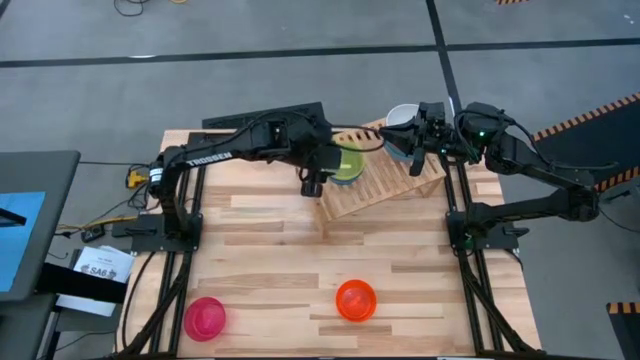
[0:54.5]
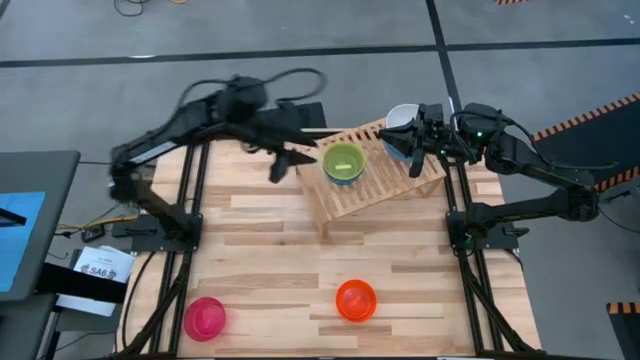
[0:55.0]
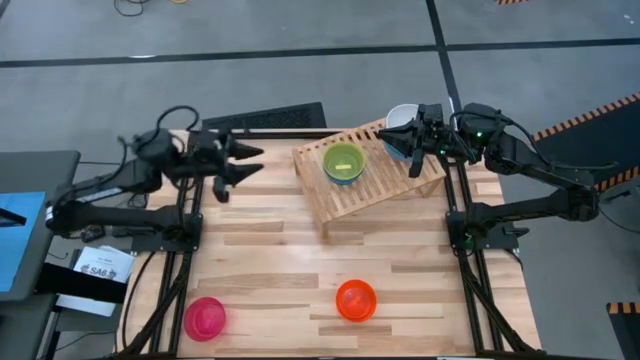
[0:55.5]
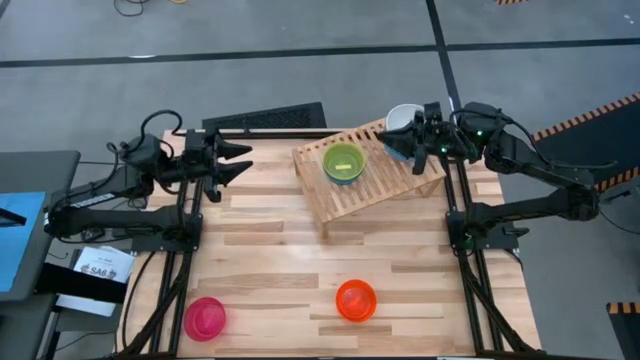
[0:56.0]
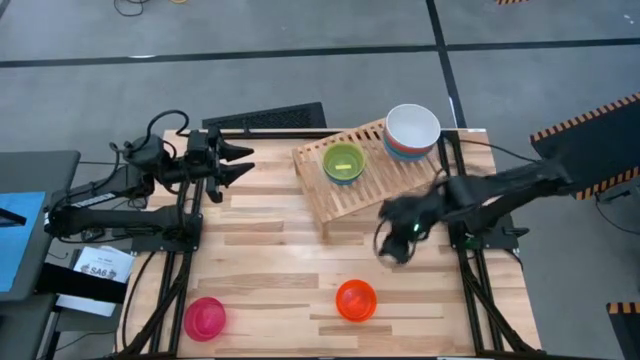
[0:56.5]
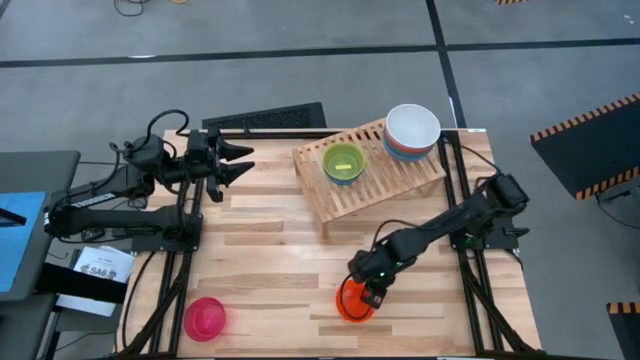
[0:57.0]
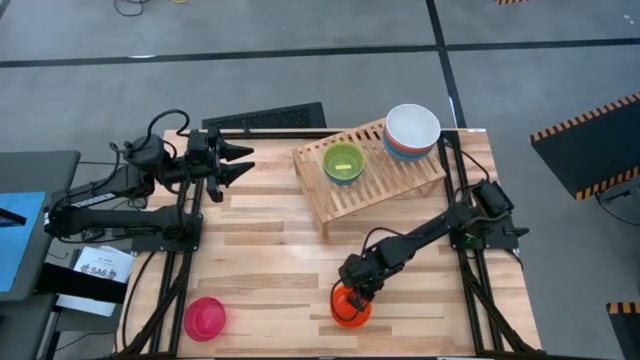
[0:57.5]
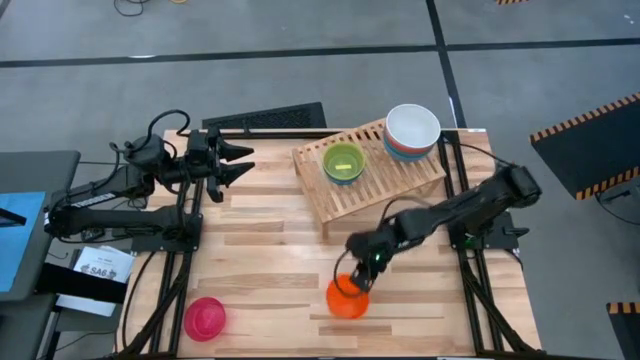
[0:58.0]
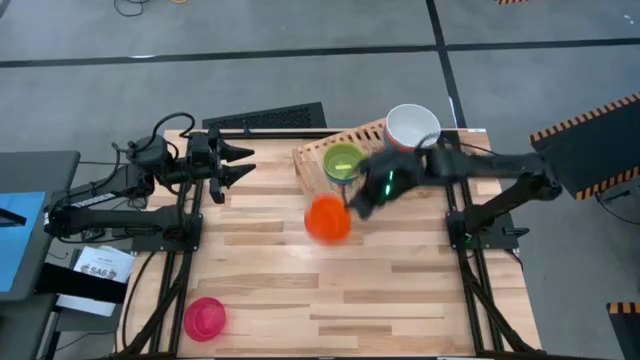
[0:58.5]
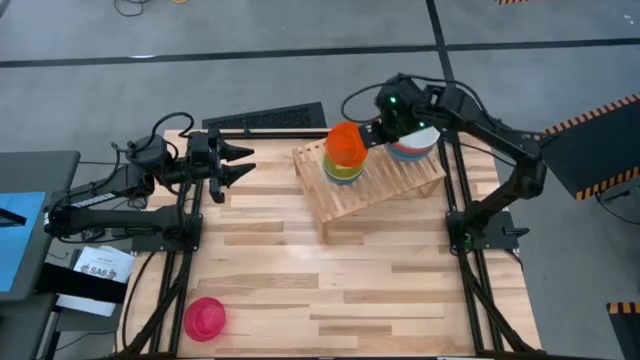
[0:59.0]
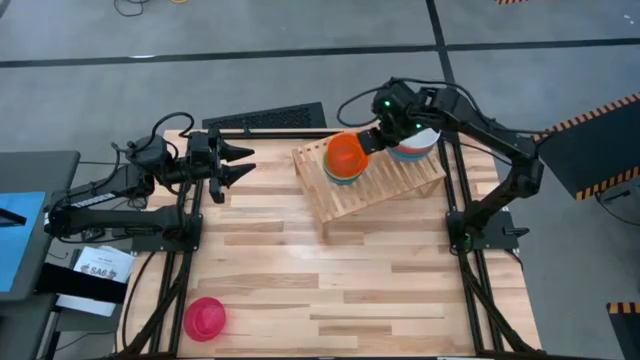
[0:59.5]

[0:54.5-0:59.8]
Task: Place and stack bowls onto a shelf
Stack the small orange bowl on top of the small yellow bowl on the shelf

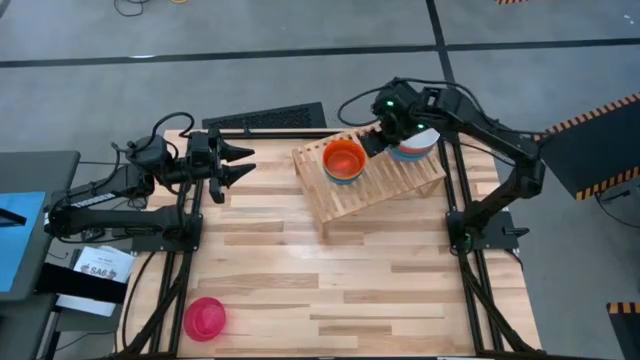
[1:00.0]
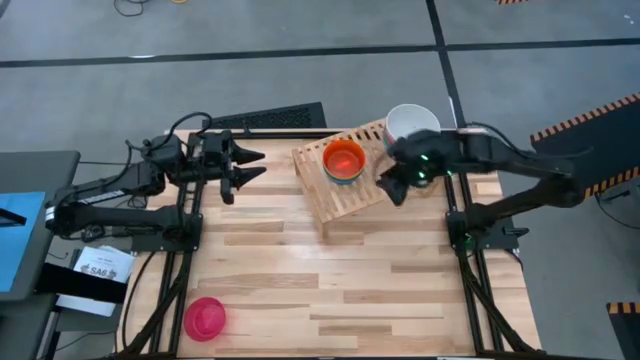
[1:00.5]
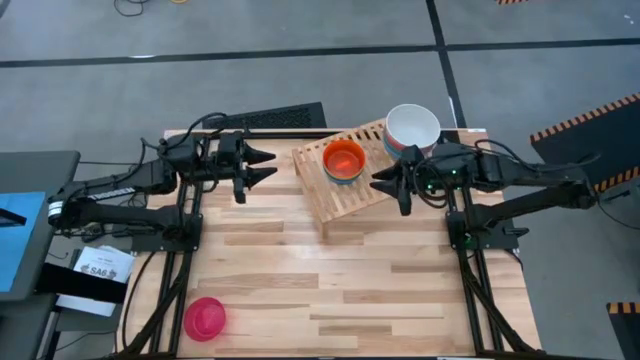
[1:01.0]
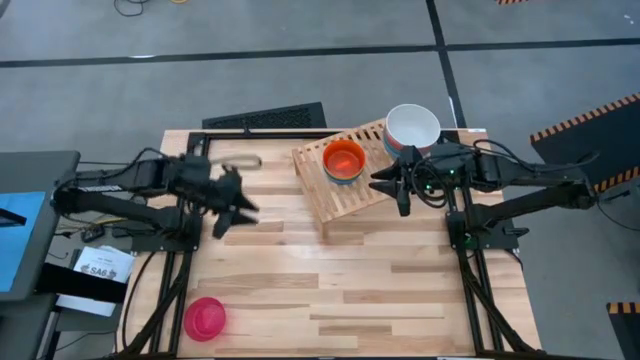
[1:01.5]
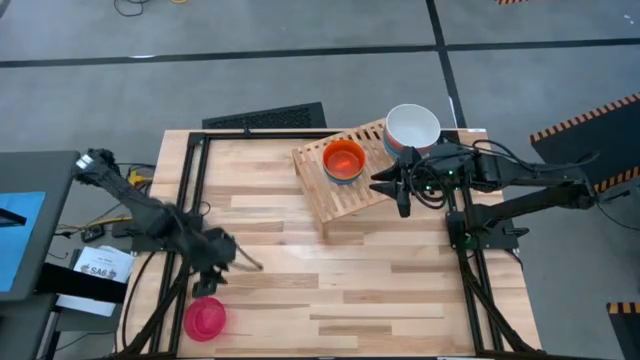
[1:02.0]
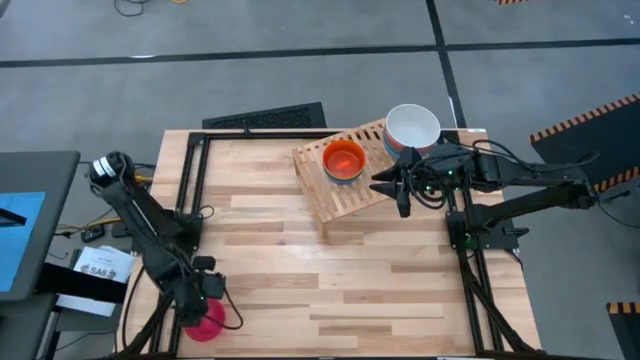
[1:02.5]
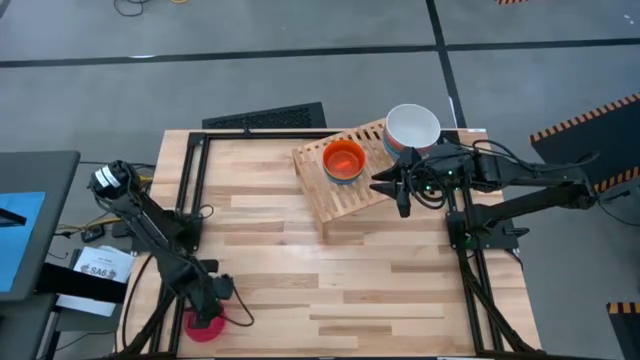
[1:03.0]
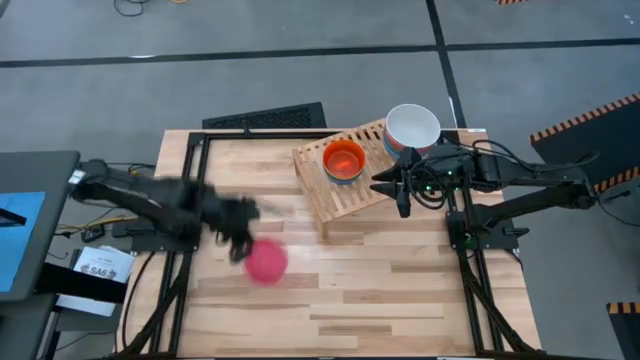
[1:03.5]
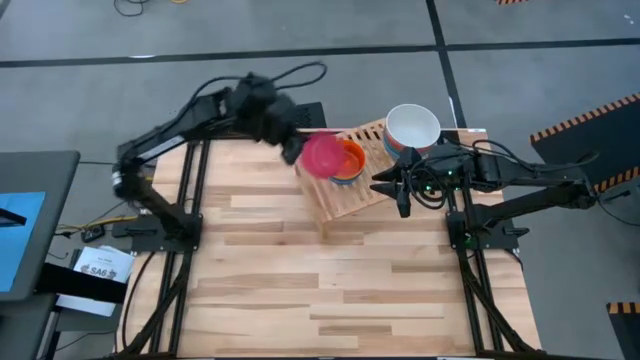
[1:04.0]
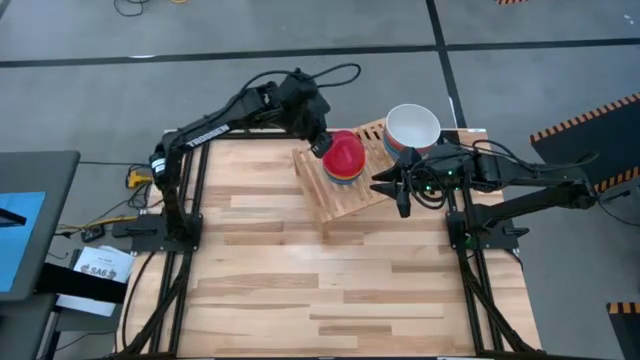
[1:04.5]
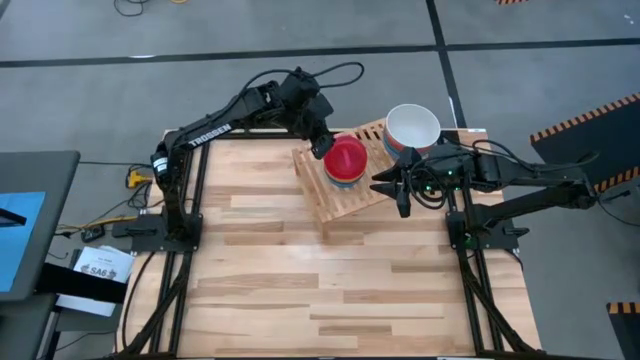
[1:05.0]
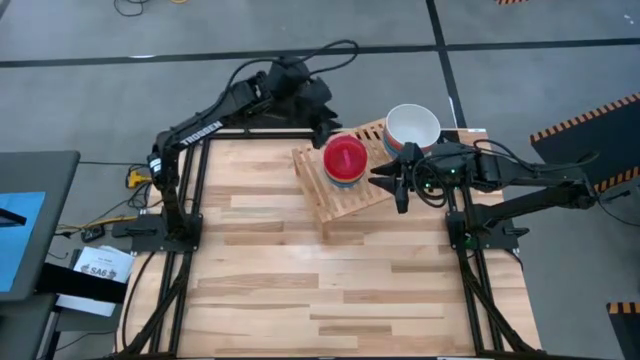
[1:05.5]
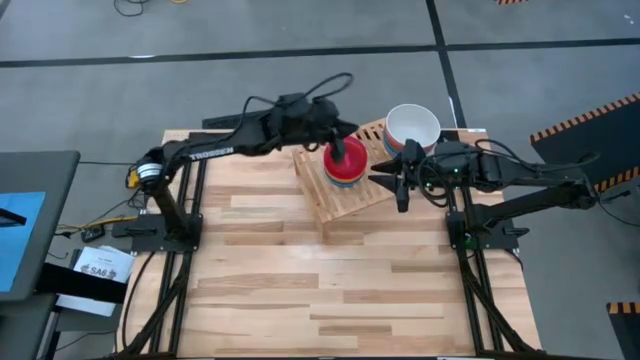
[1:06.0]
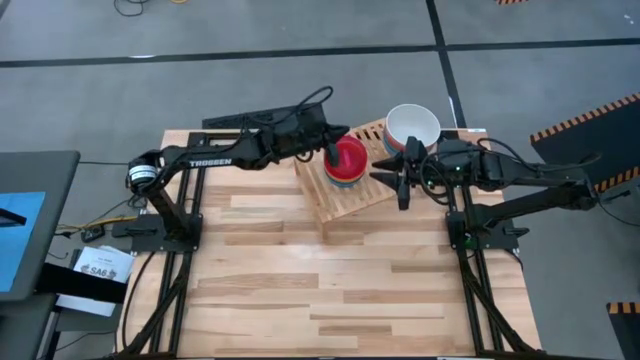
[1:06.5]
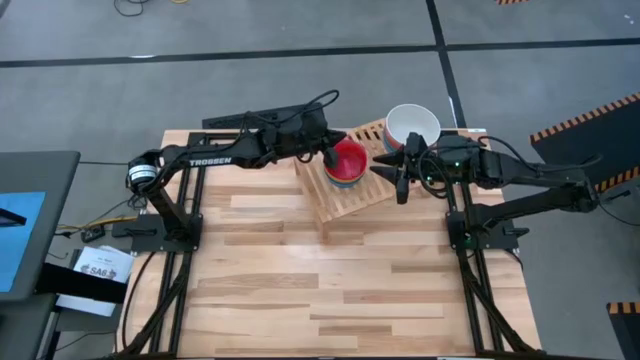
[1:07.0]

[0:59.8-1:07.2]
Stack the small red bowl on top of the small orange bowl on the shelf

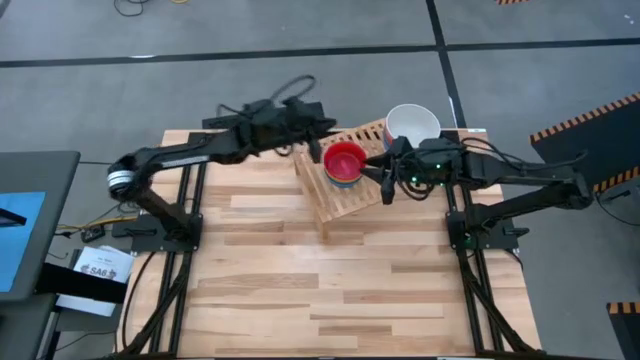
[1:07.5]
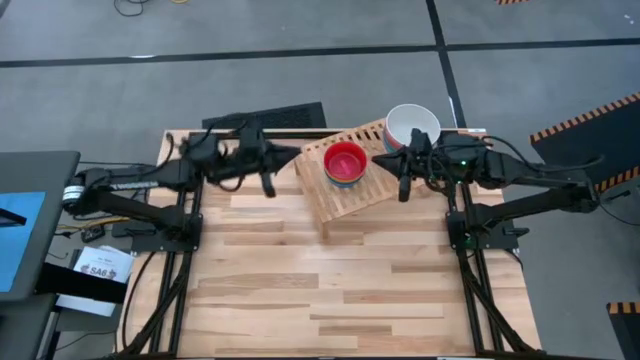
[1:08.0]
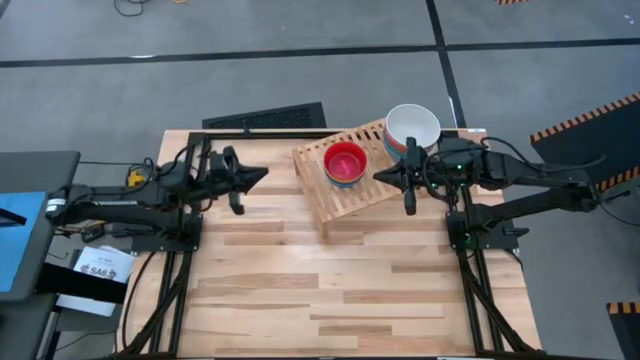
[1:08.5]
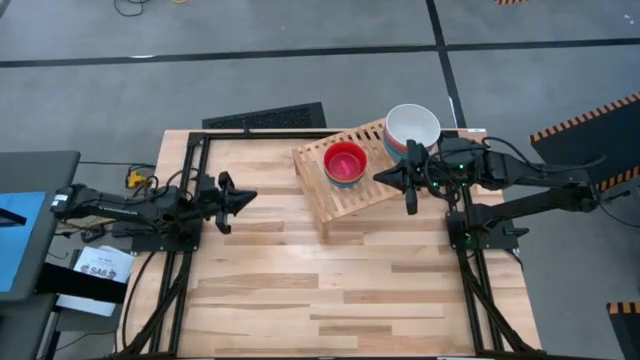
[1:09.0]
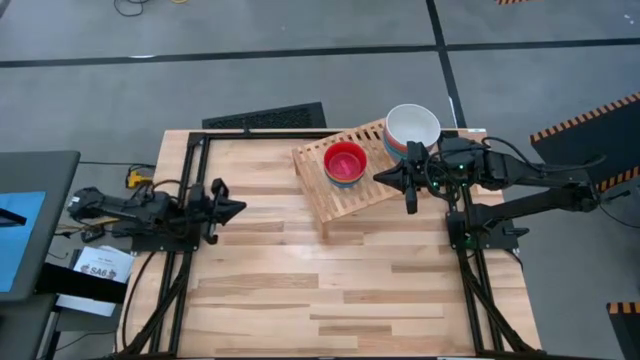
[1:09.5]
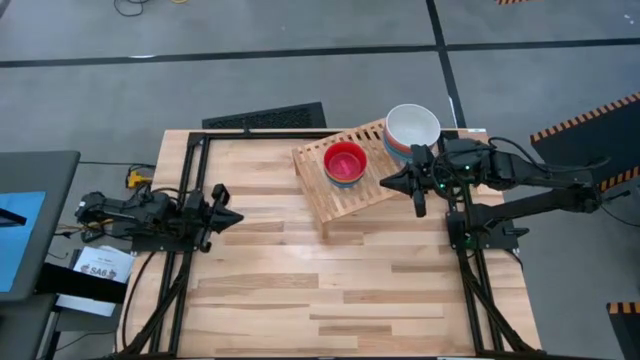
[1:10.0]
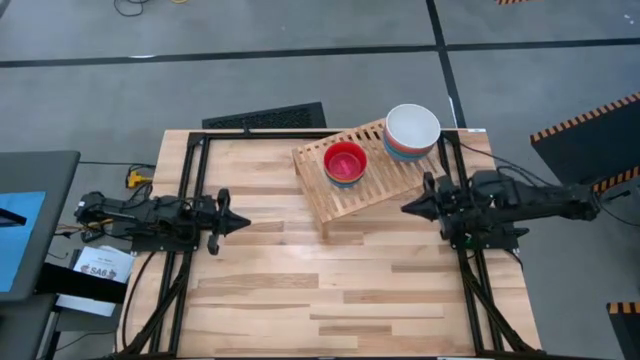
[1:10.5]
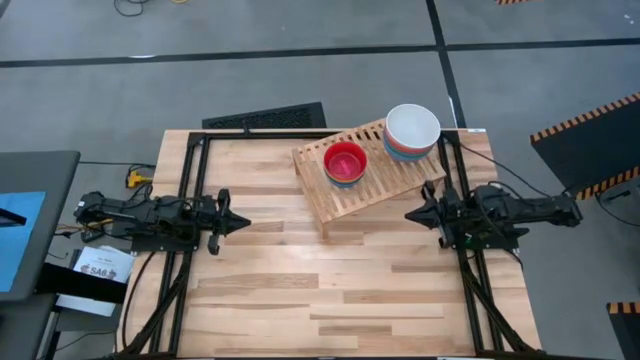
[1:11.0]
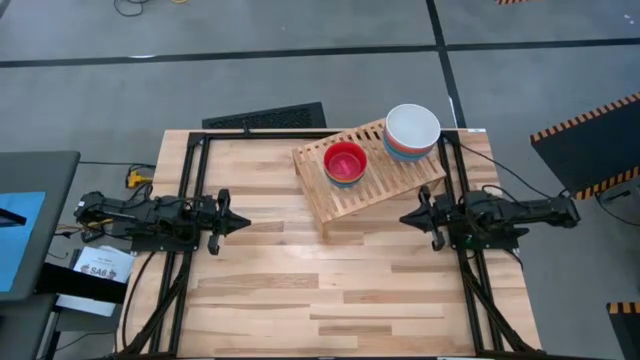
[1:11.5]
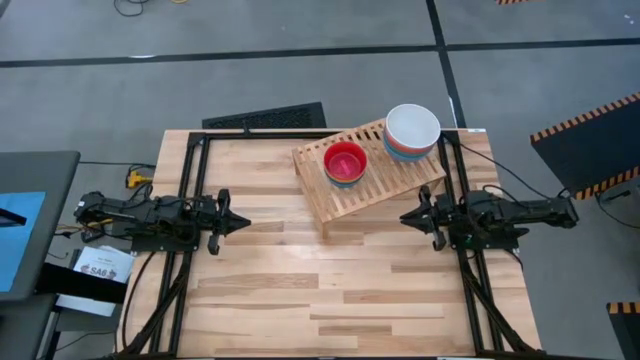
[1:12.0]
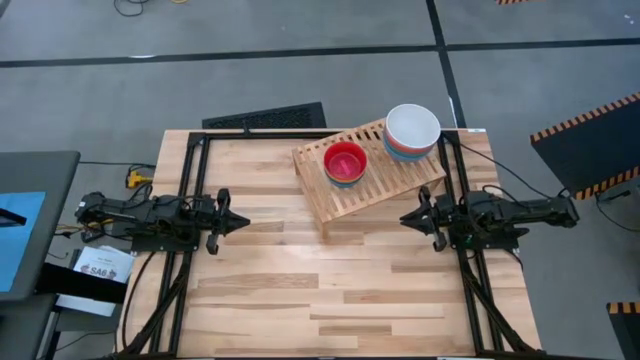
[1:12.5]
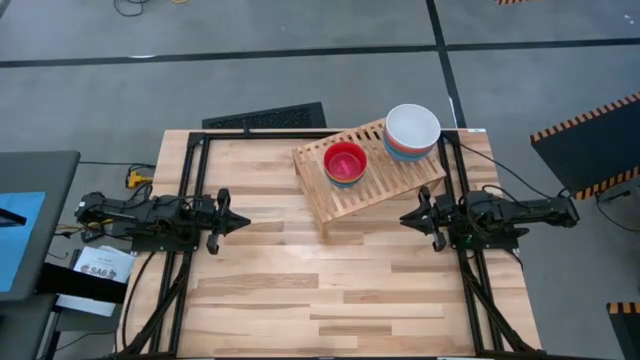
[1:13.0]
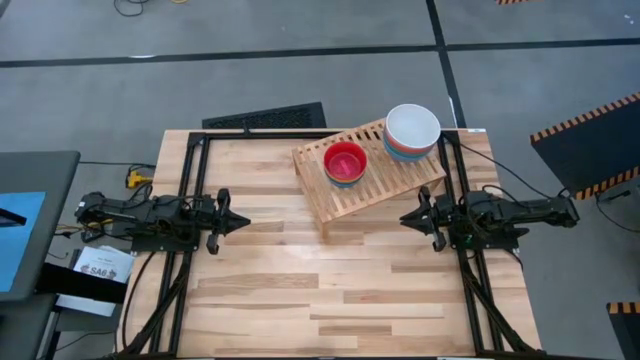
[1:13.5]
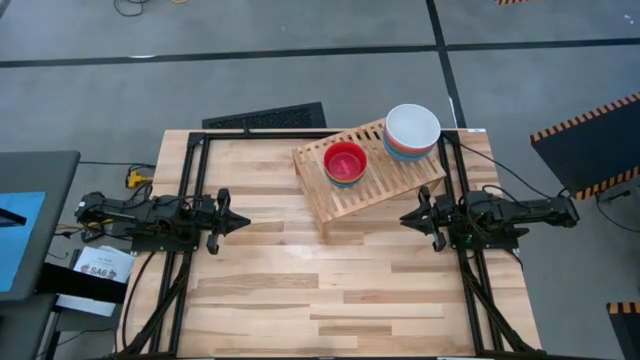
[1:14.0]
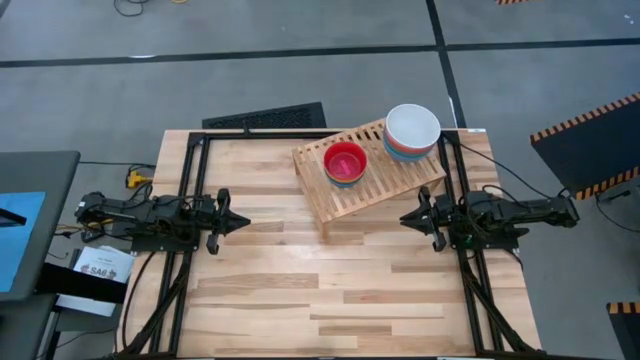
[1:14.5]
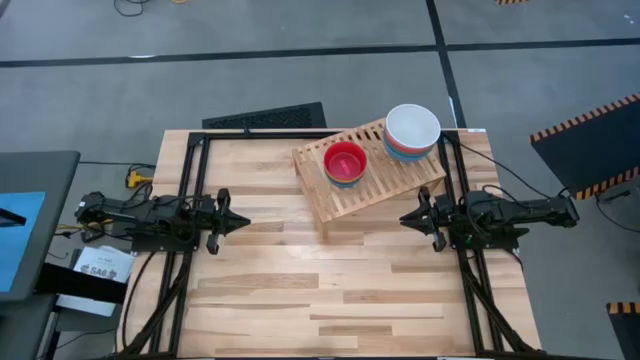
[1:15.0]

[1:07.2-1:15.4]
Return to Home Position
